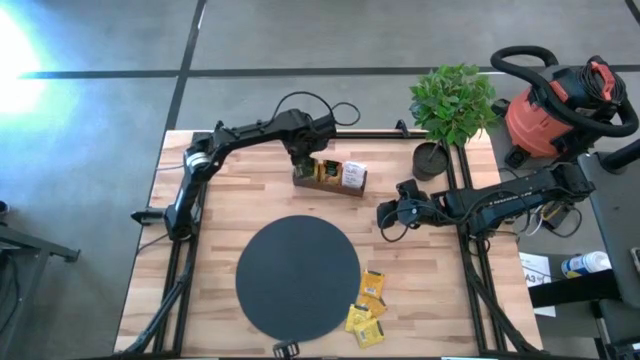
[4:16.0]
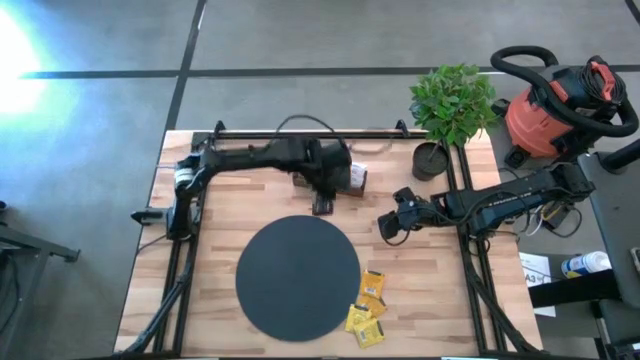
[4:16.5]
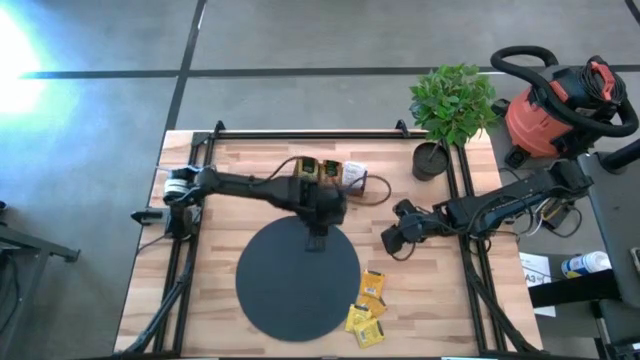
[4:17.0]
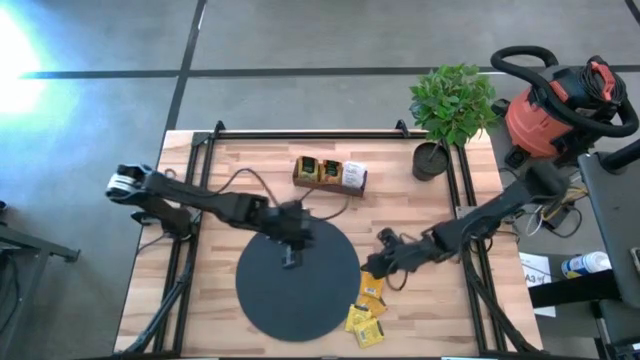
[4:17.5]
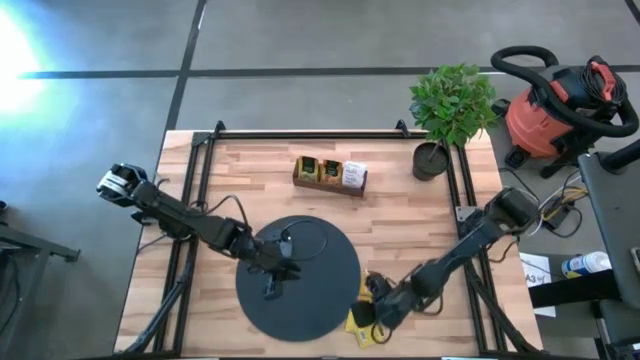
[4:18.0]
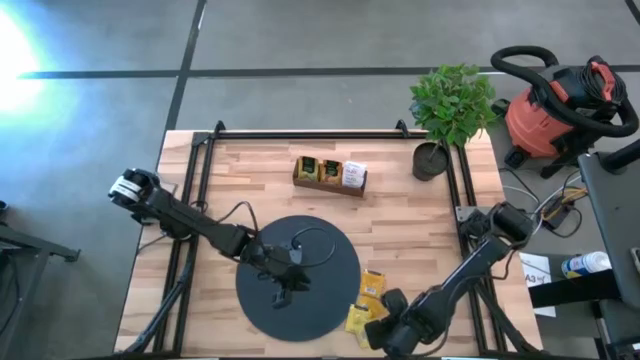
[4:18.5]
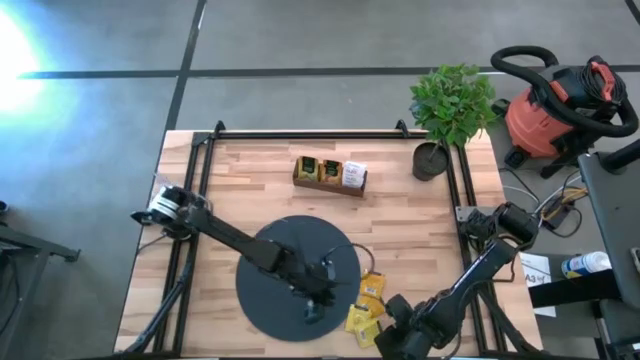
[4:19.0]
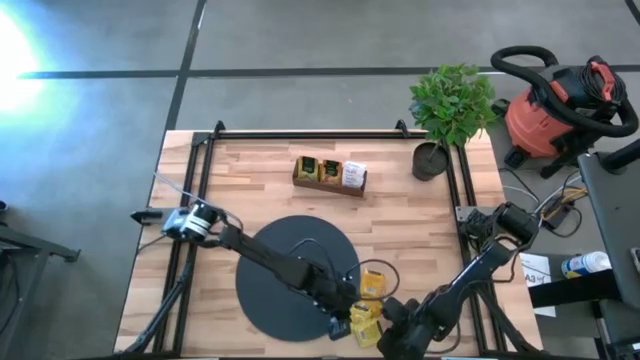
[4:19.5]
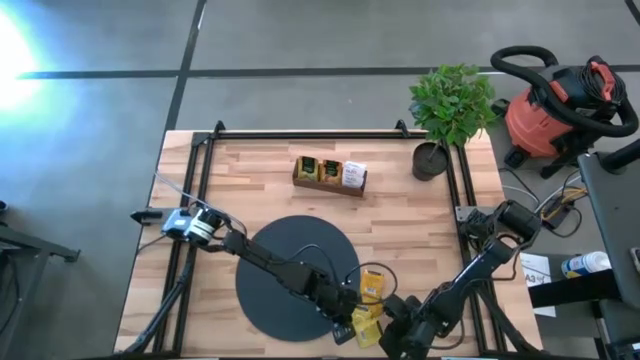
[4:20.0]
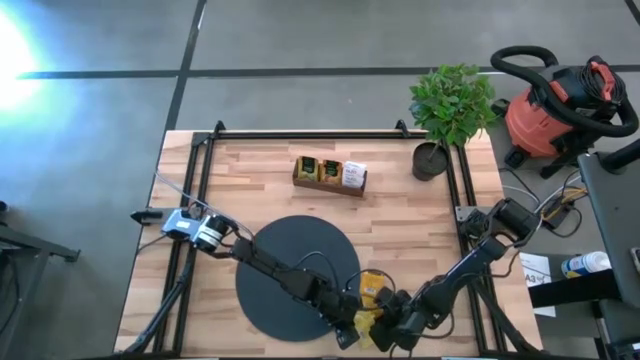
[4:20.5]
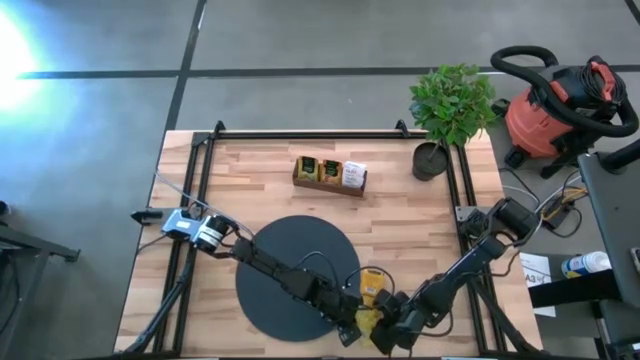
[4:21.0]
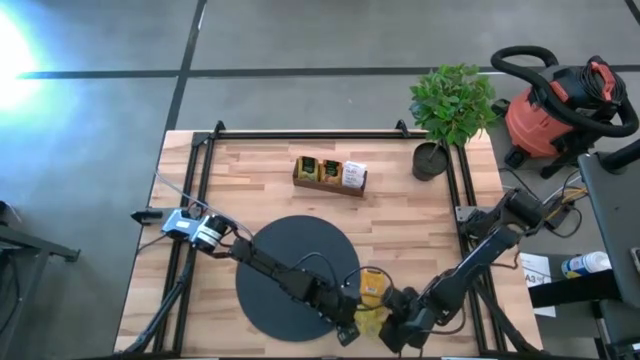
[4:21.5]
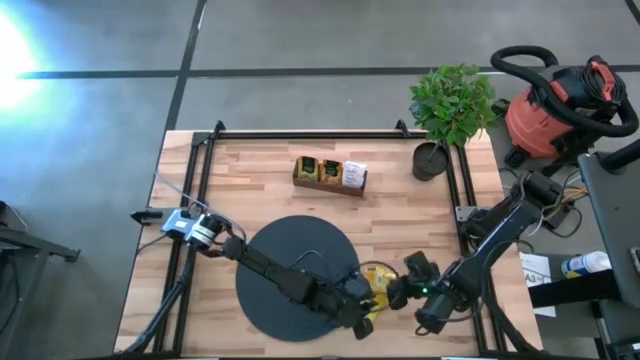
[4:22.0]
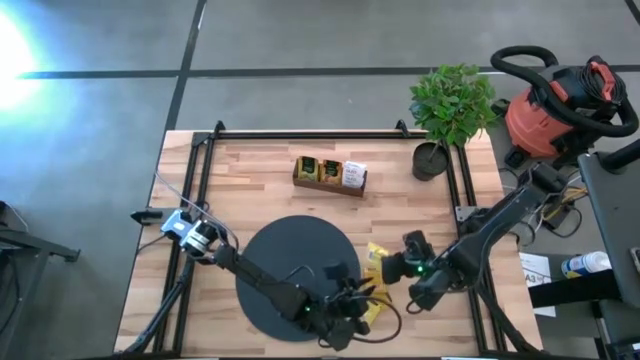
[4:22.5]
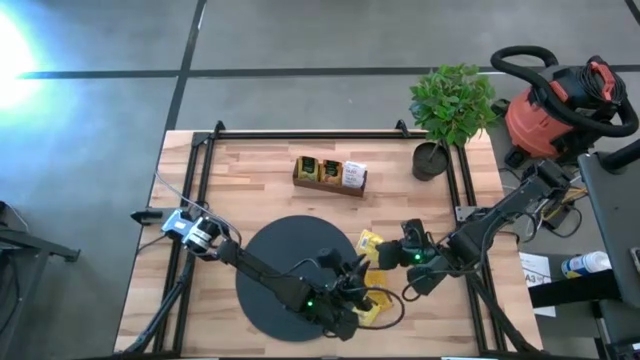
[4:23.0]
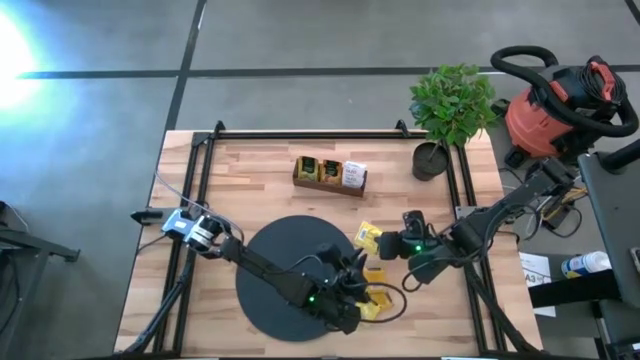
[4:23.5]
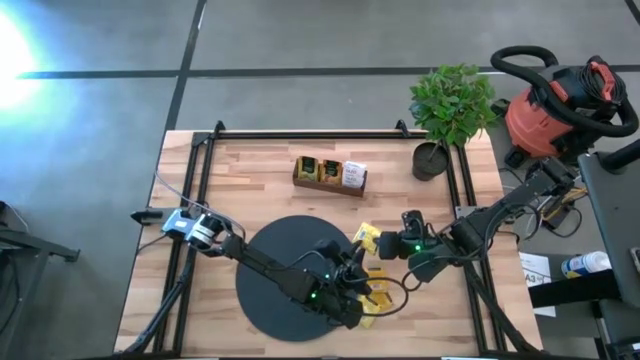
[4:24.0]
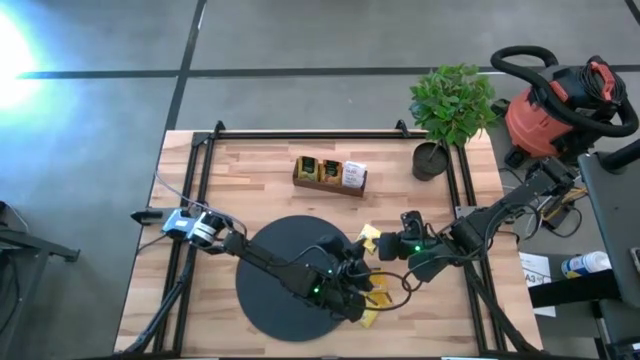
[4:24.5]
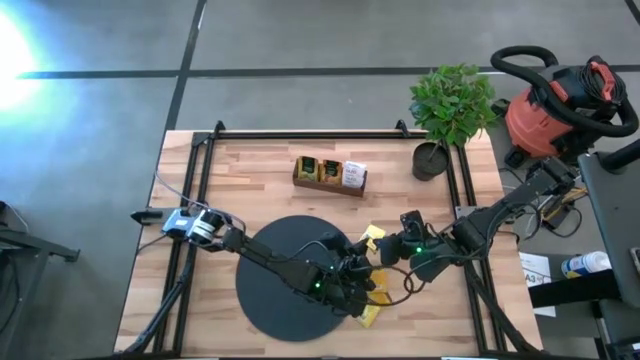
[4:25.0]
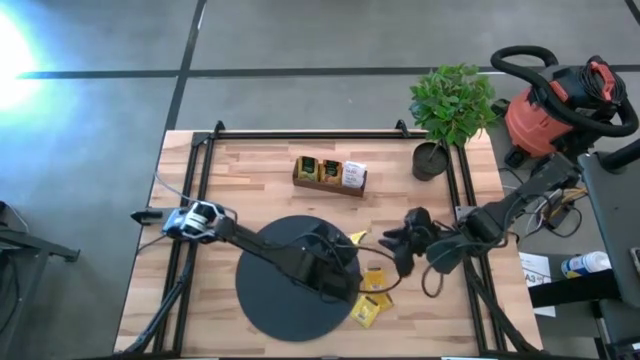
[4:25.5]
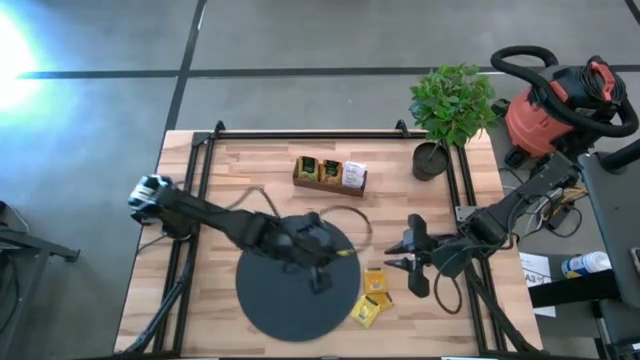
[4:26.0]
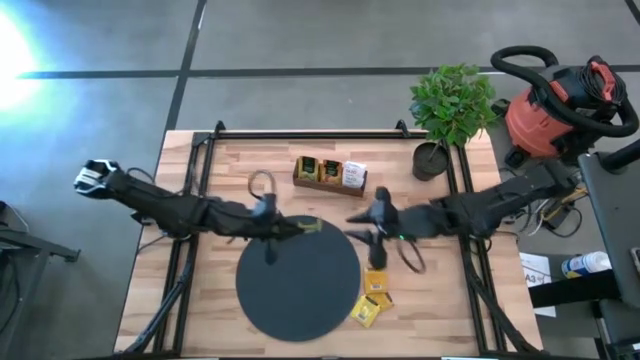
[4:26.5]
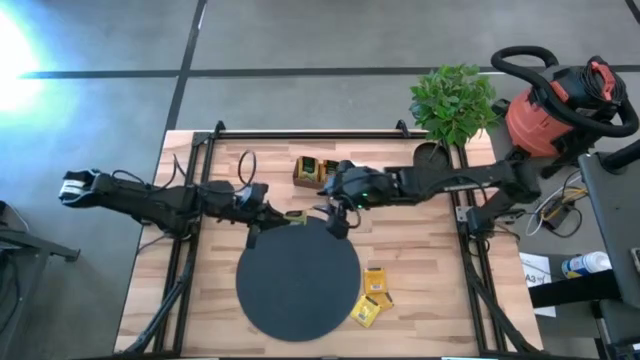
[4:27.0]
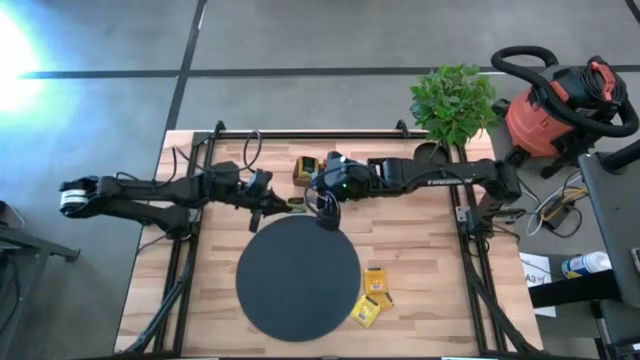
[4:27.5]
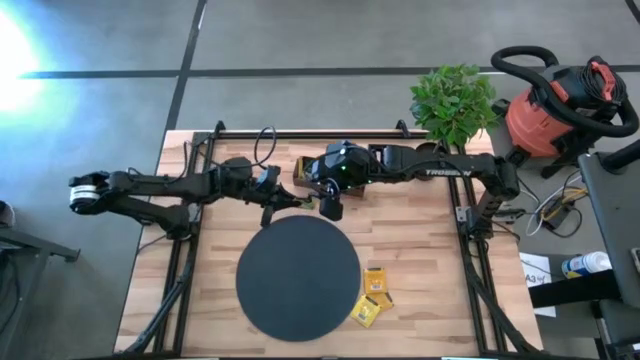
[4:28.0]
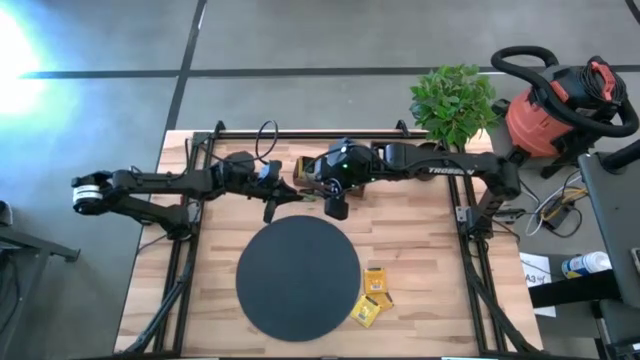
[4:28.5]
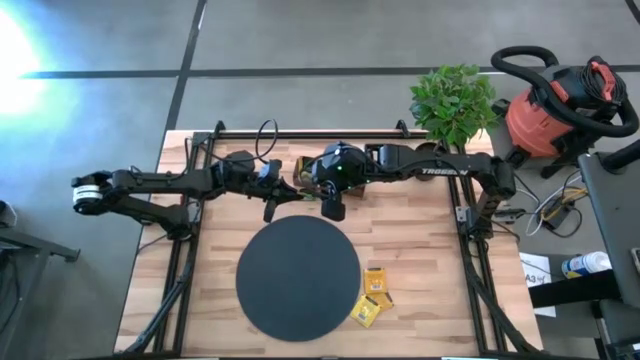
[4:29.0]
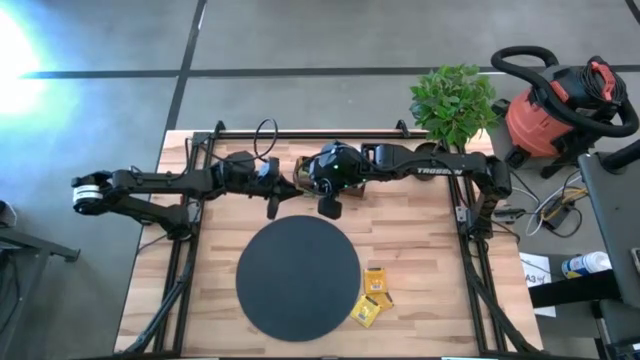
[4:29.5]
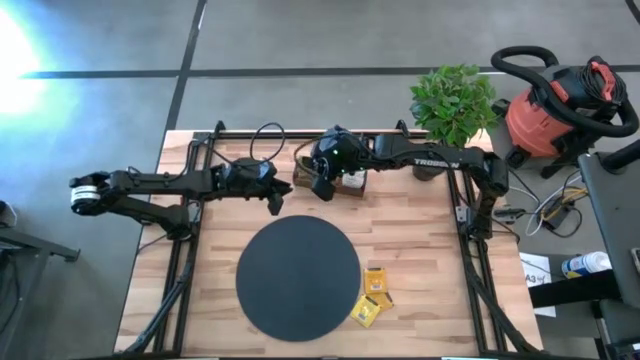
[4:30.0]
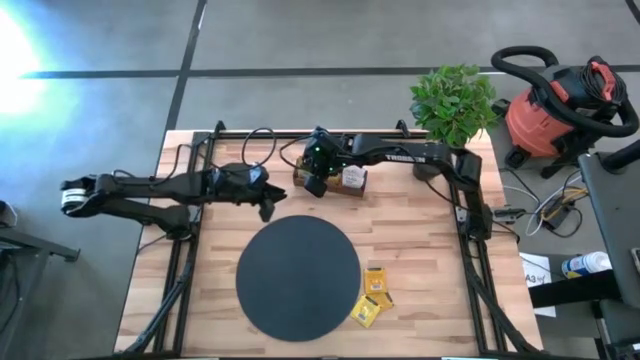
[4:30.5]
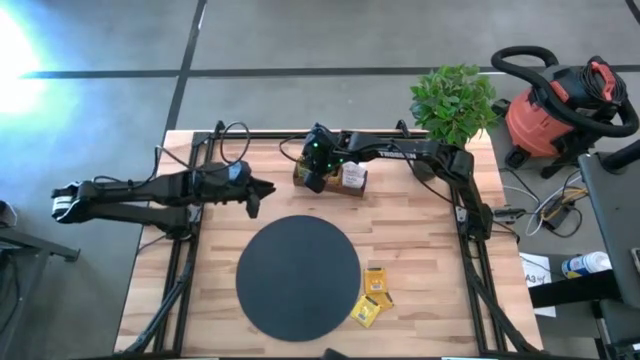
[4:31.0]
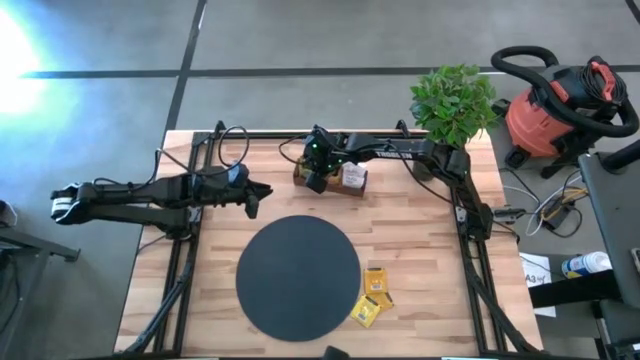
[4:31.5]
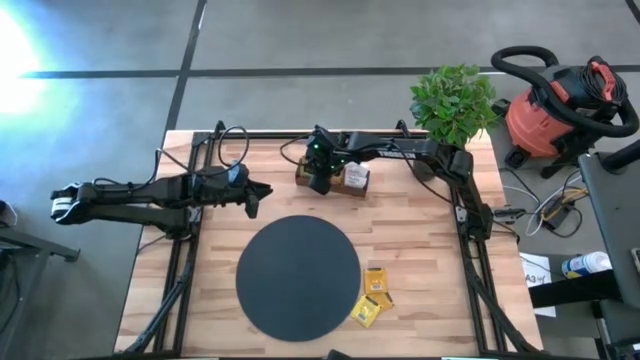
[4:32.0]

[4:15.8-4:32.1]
Task: Pick & Place Tea
Put the bottom yellow tea bag into the left section of the wooden organizer

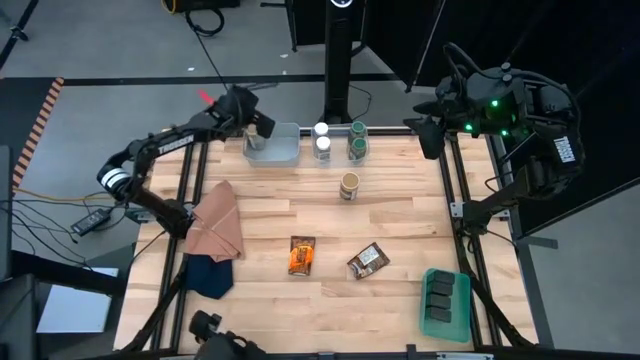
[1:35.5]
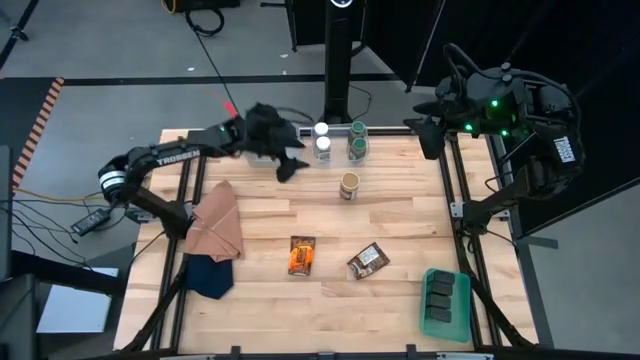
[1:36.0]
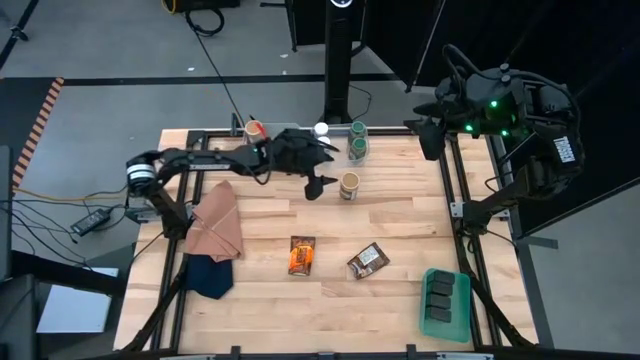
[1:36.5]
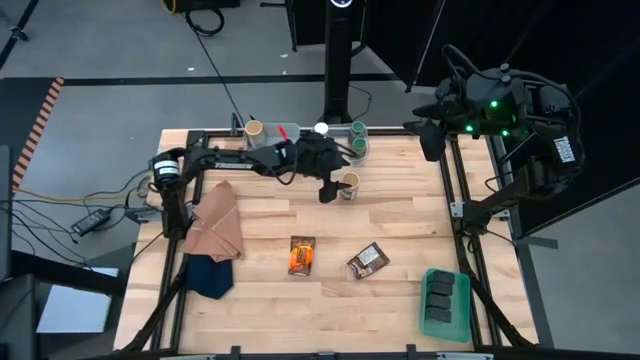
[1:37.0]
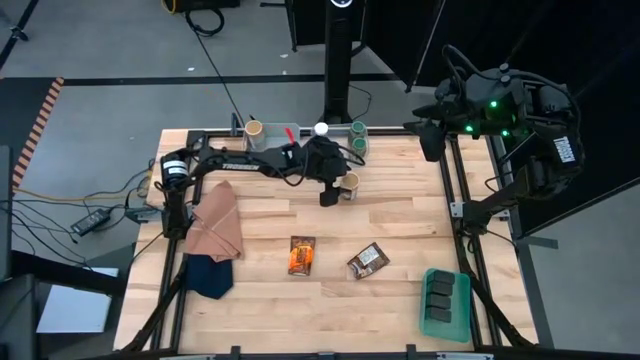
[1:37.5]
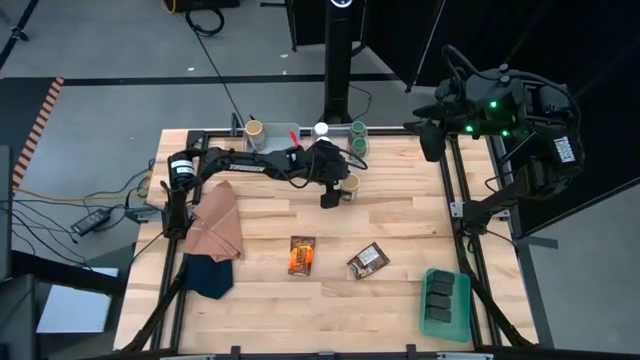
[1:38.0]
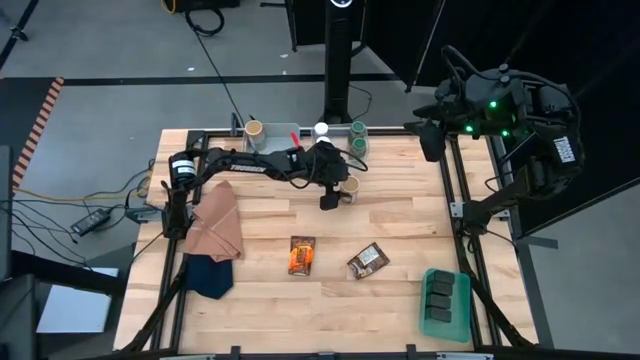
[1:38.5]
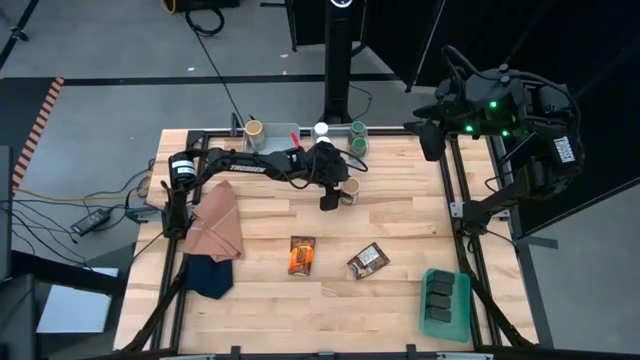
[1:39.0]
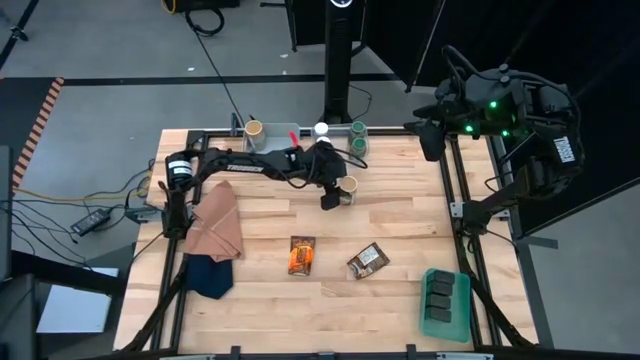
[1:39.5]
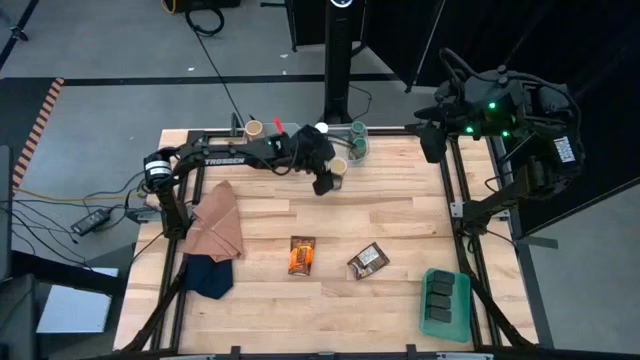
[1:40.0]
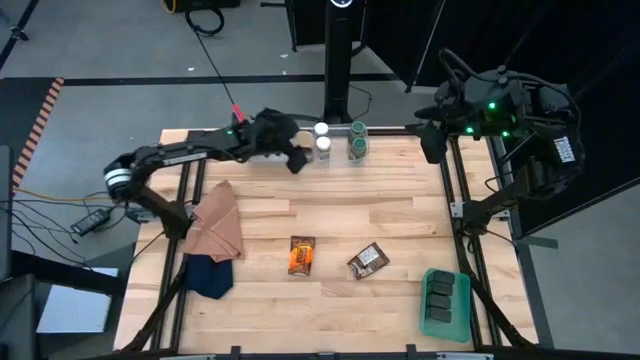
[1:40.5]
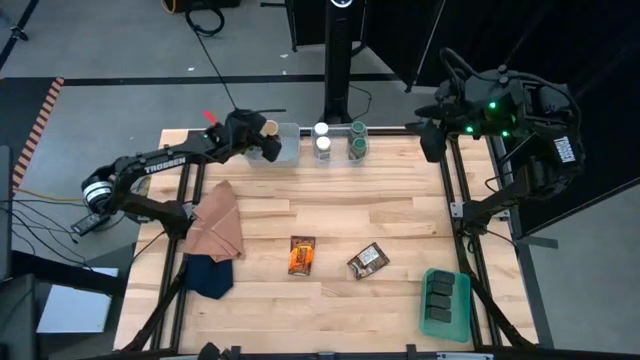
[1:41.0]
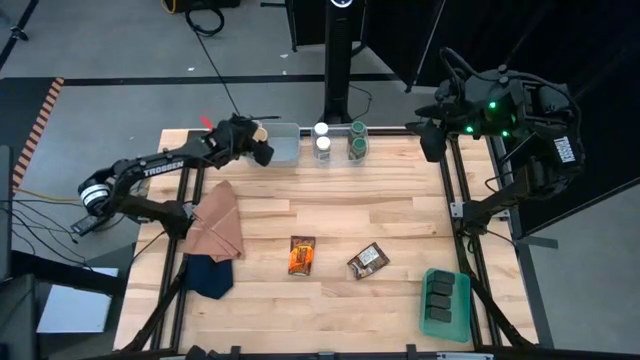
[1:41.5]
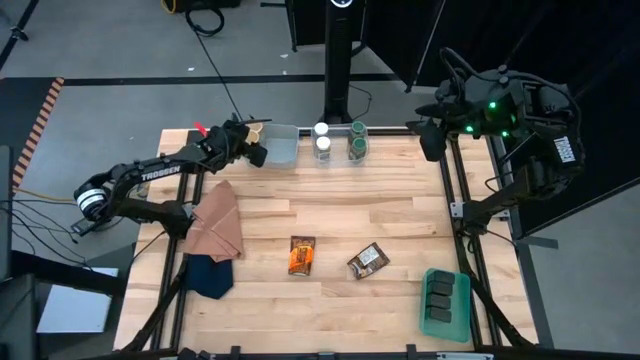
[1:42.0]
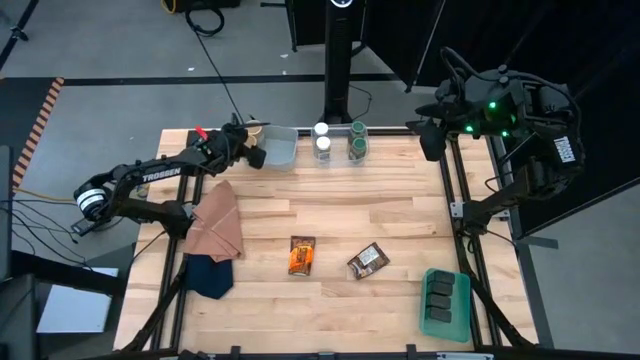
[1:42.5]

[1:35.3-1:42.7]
Task: Sort spices by type
Put the gold seasoning bottle into the gray bin
